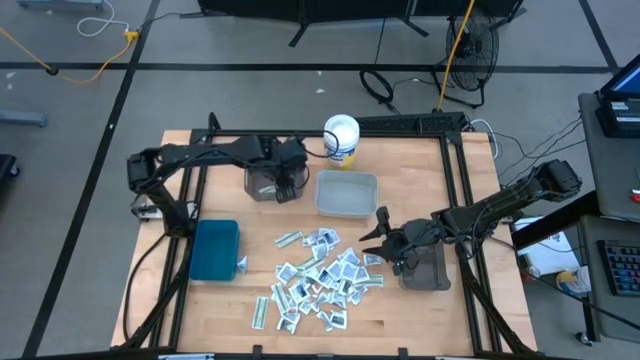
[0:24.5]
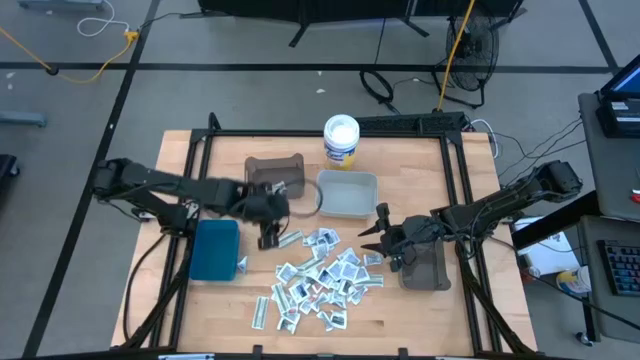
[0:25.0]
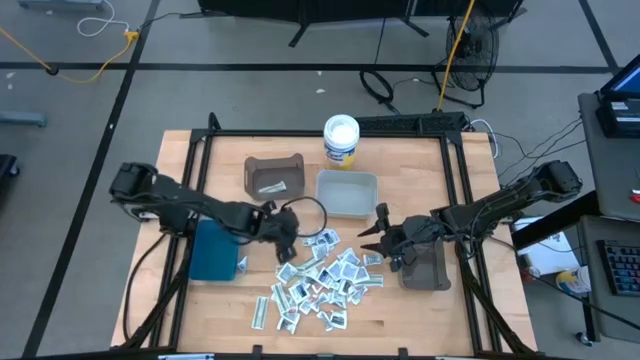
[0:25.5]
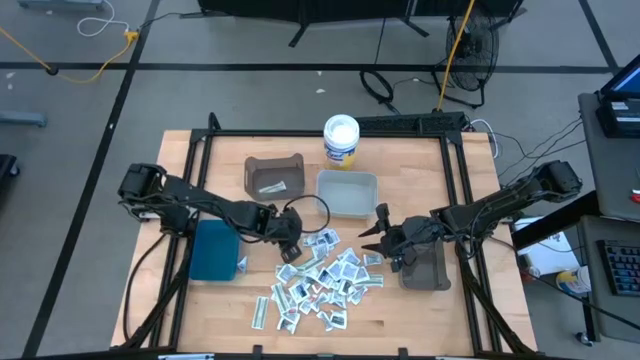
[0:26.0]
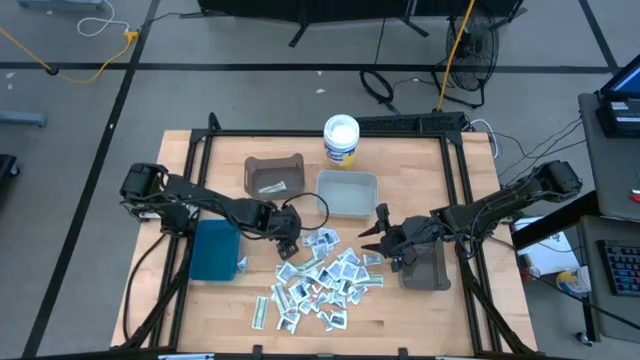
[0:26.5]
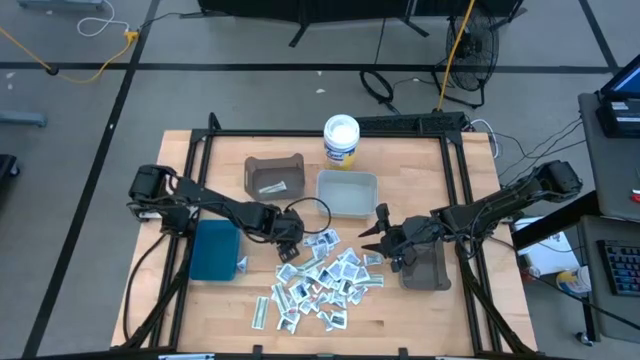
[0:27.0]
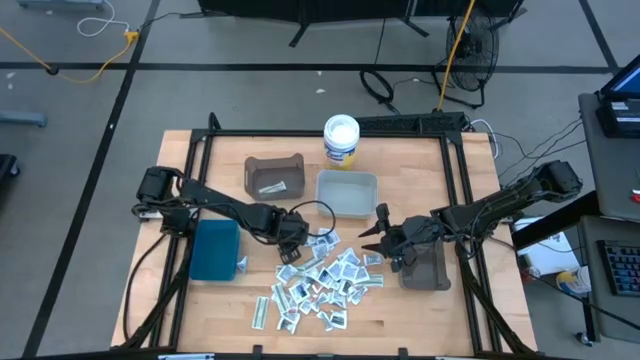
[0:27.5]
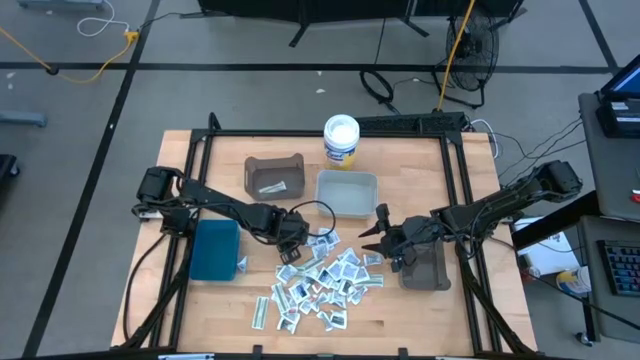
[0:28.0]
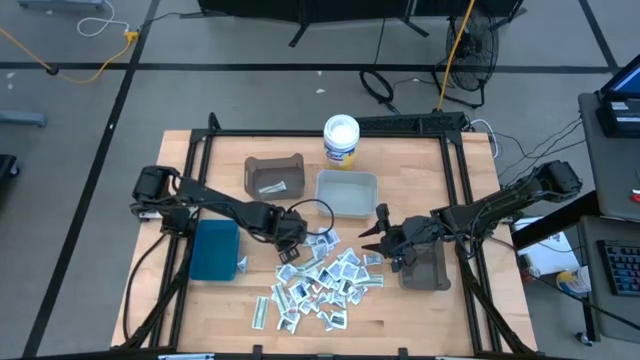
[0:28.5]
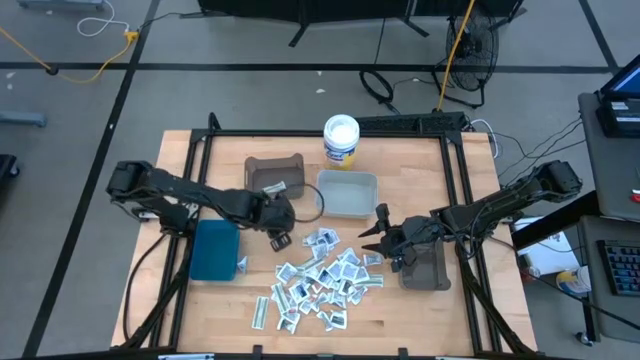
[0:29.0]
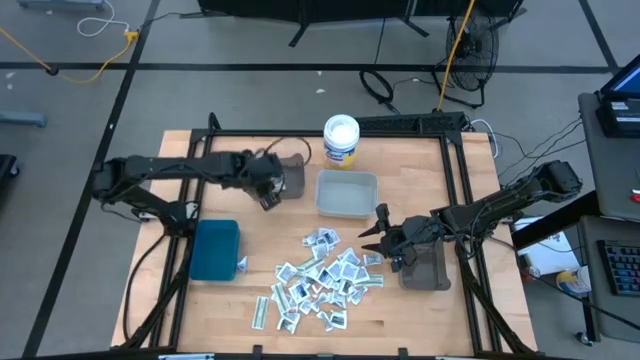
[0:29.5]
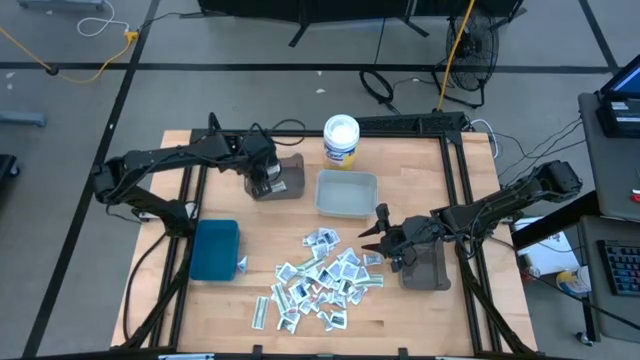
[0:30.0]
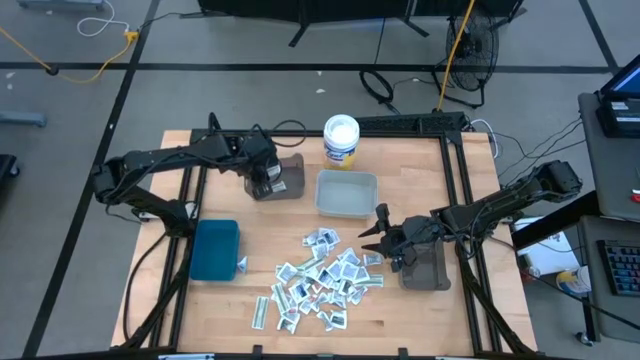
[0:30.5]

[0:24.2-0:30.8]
Task: Pick & Place First Aid Supplies
Put the green bandage pack into the top black bin

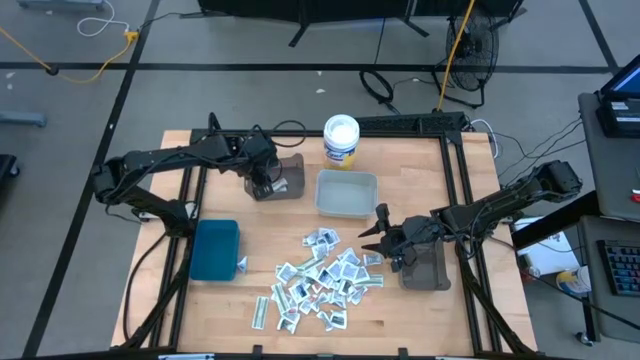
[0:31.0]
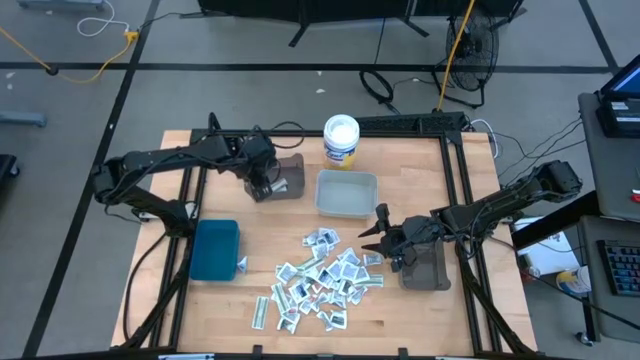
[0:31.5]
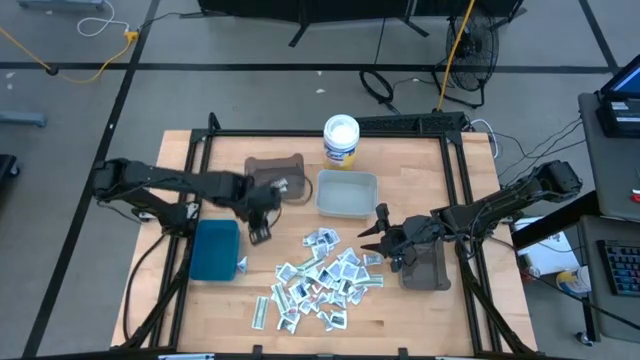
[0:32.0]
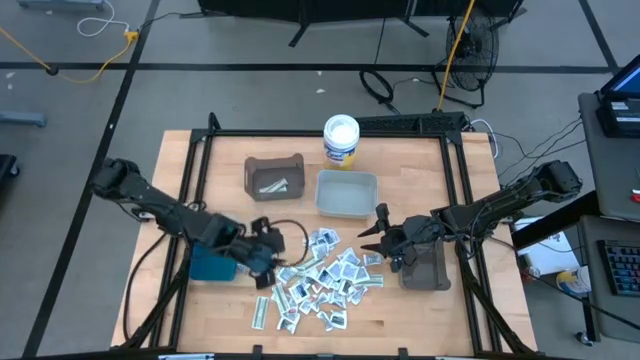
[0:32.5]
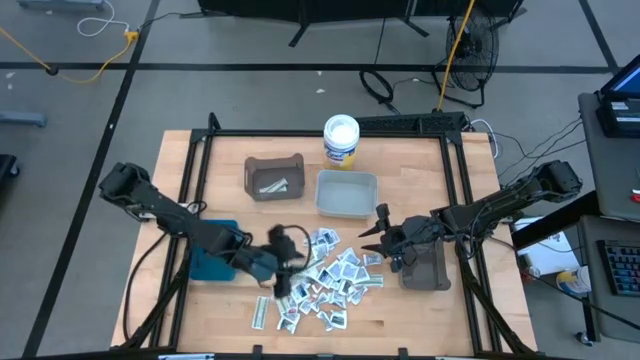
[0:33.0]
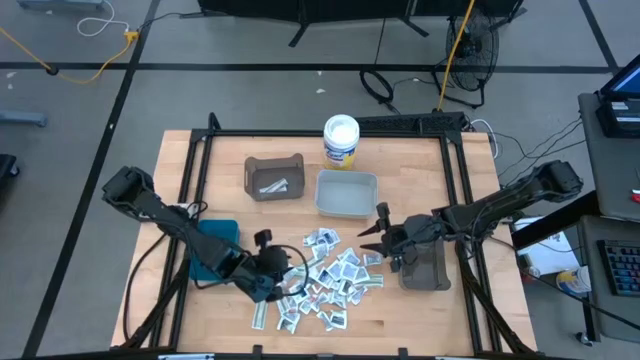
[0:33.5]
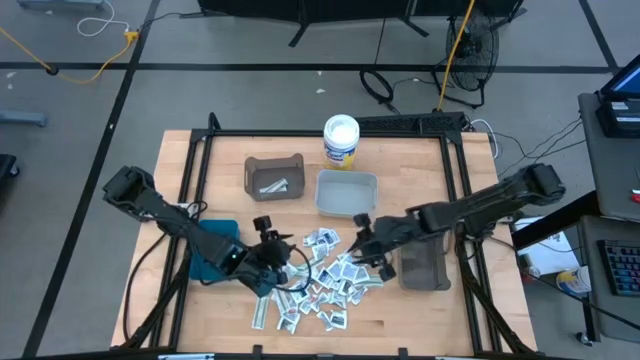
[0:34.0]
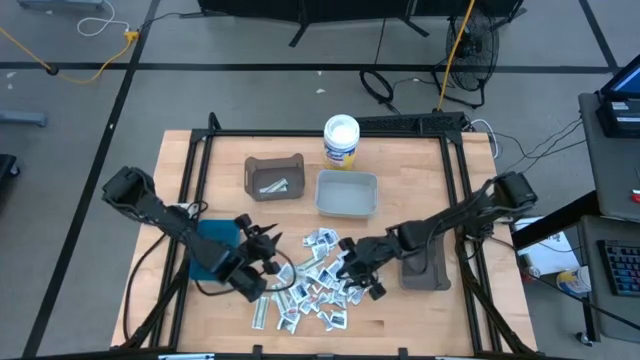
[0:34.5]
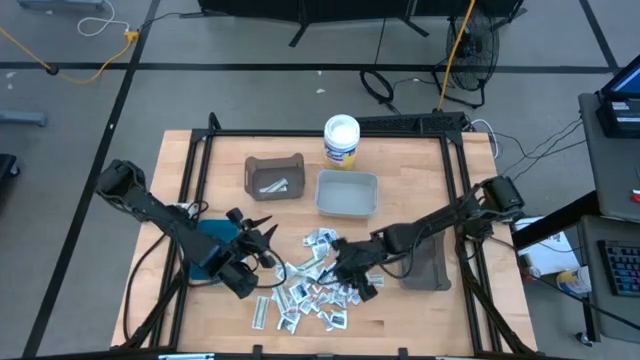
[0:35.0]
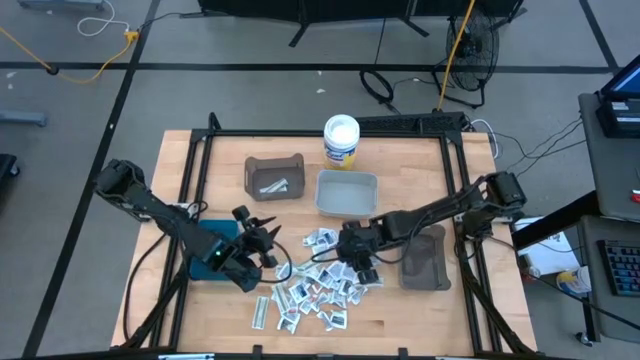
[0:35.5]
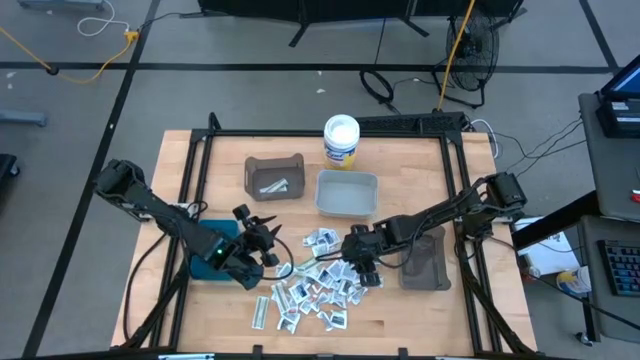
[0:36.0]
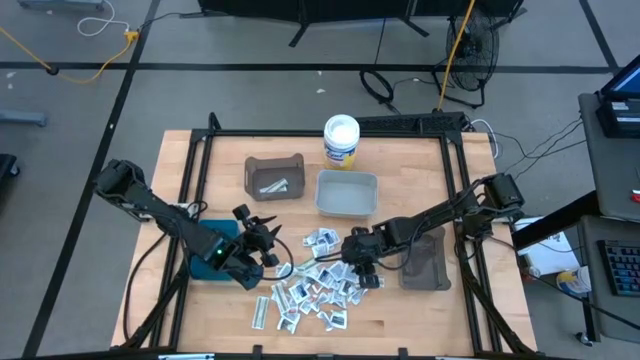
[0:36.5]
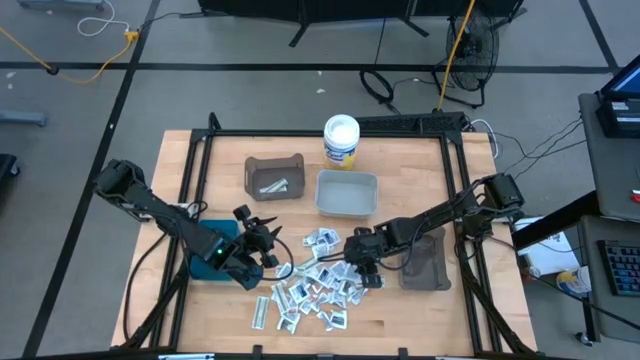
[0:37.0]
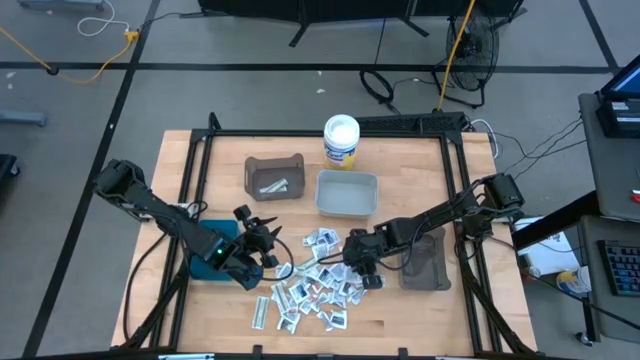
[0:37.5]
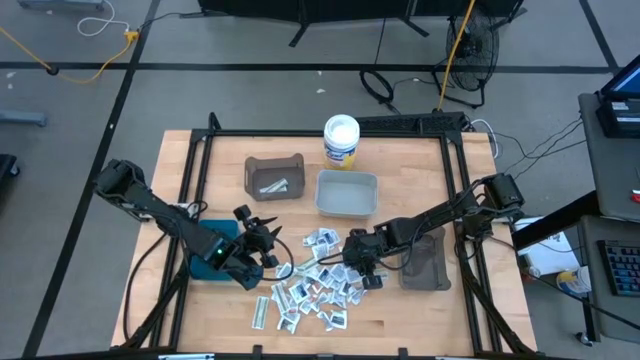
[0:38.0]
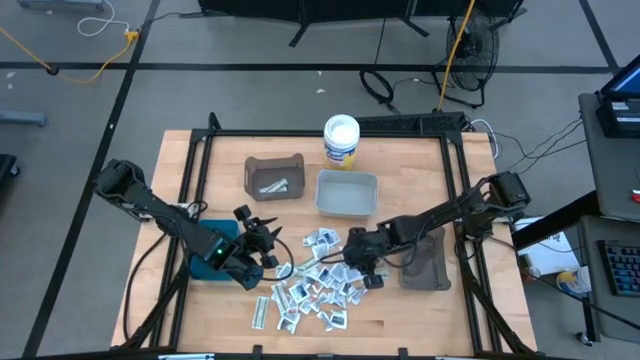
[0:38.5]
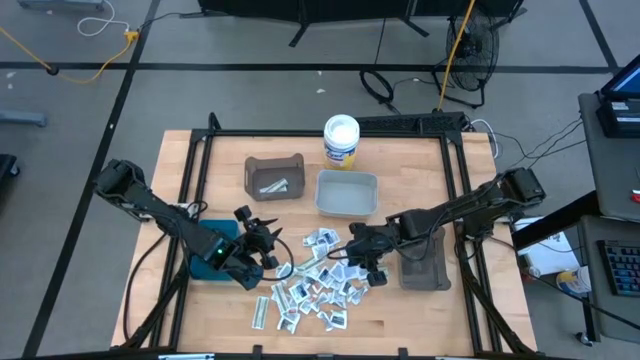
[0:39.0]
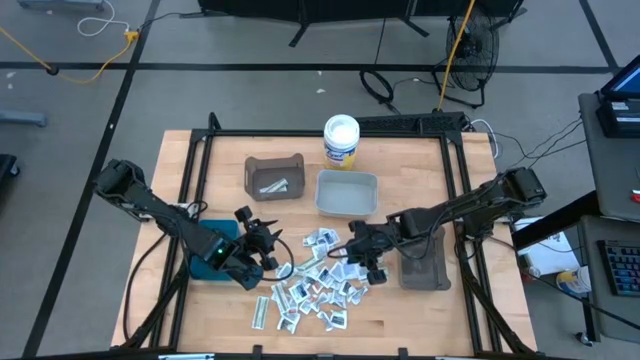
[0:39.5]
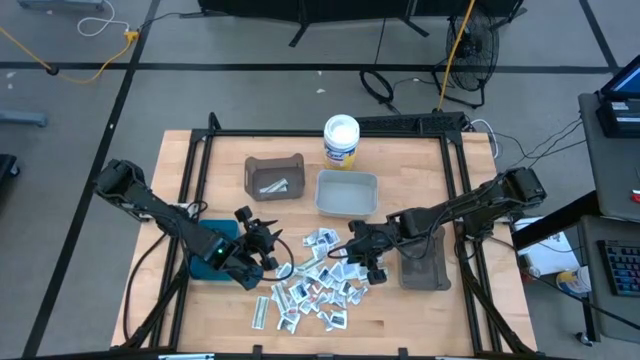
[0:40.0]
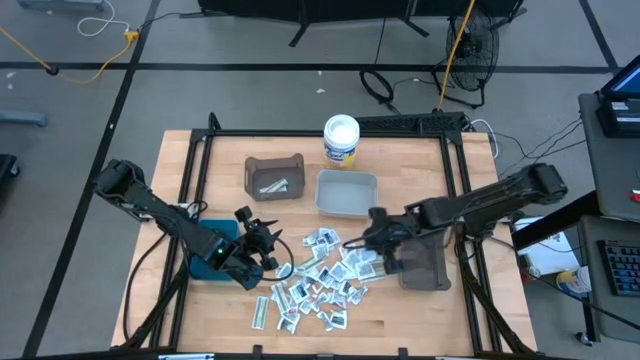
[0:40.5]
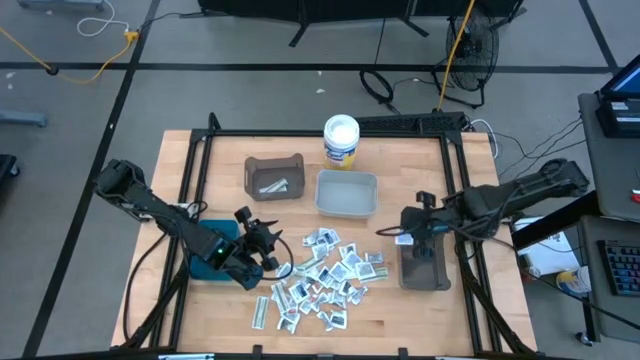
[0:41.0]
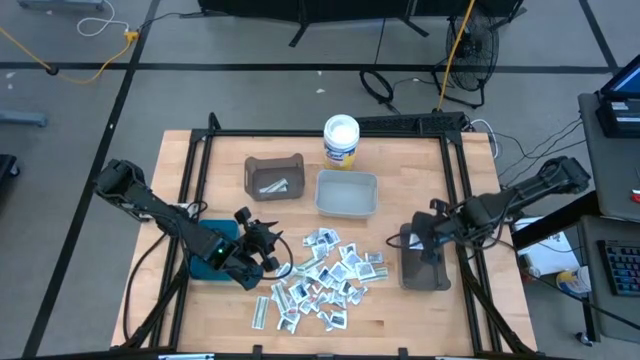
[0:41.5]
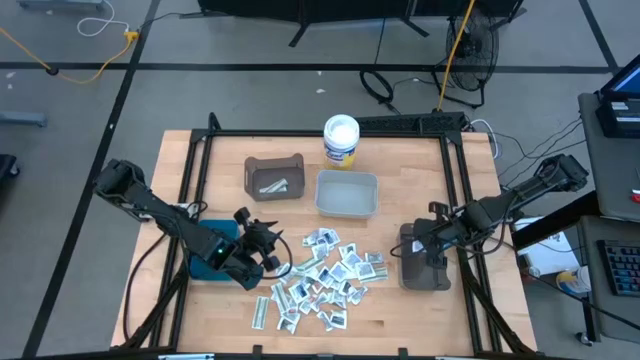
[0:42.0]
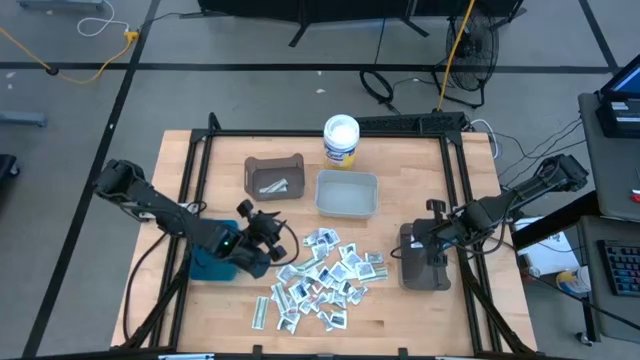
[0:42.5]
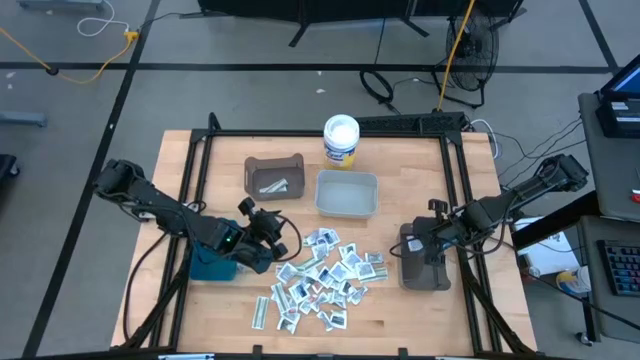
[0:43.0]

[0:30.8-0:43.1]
Put the blue alcohol pad into the bottom black bin

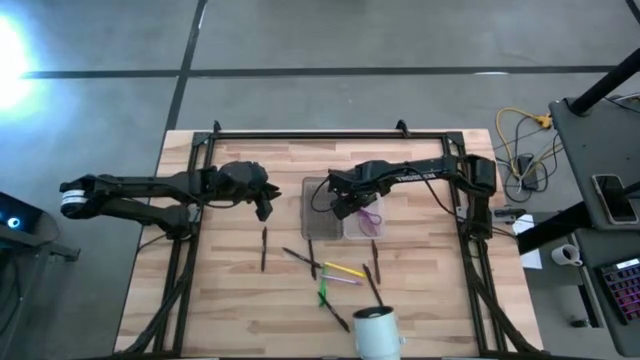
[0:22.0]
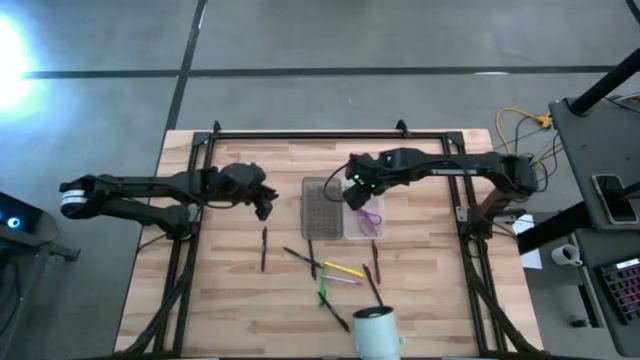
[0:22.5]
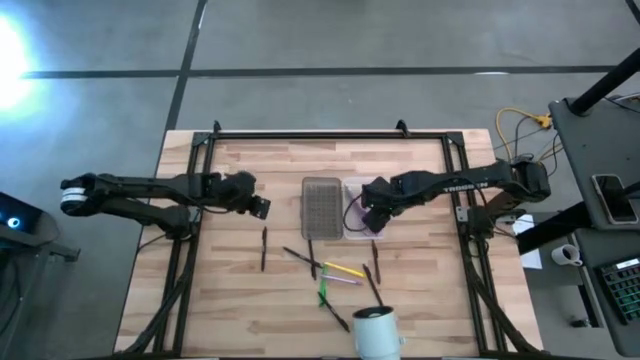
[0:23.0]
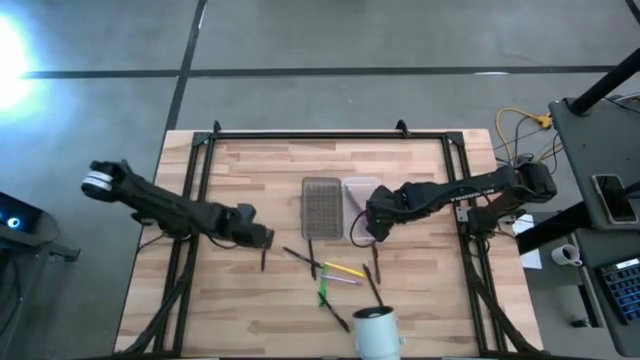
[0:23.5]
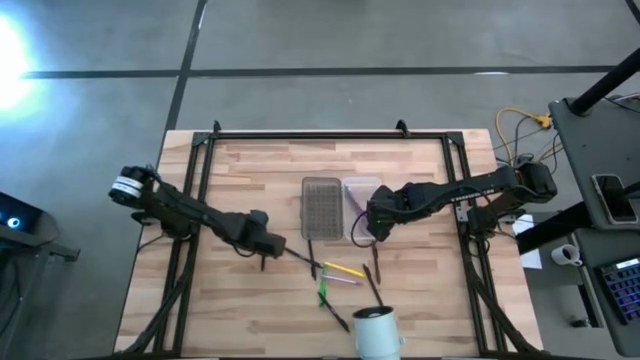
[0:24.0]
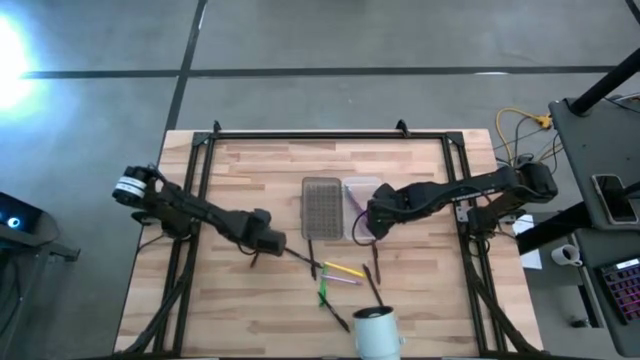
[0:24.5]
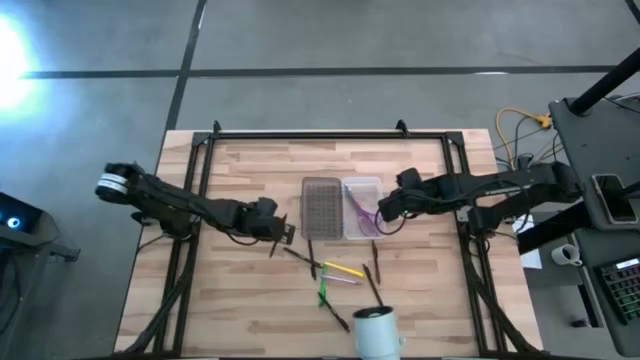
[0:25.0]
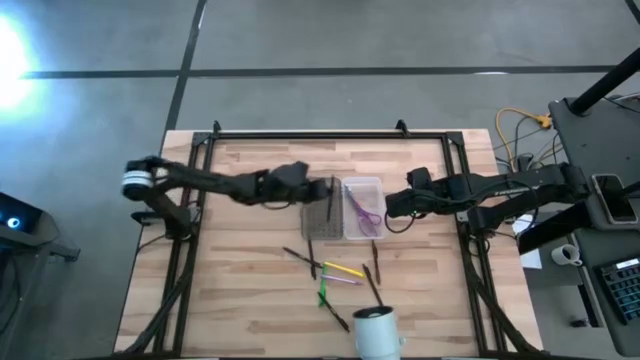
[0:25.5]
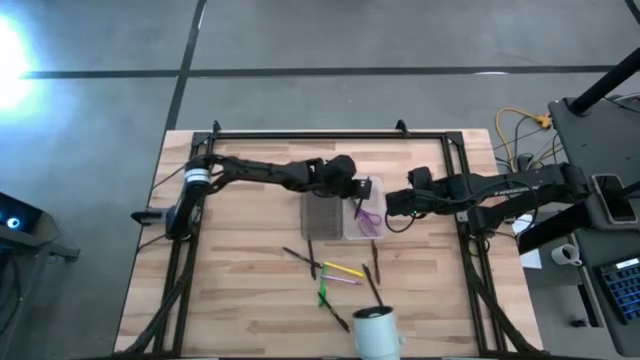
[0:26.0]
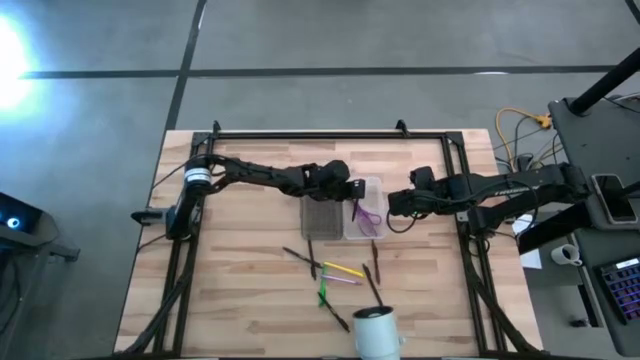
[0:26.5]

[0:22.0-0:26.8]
Task: Pick & place school supplies into a supply box
Put the black pen into the gray supply box
